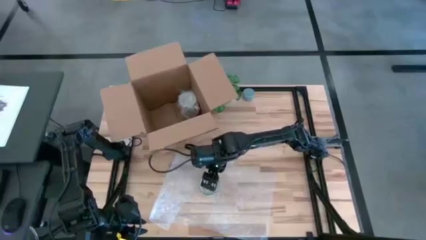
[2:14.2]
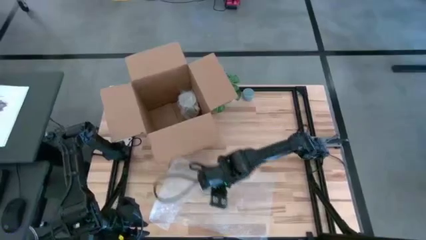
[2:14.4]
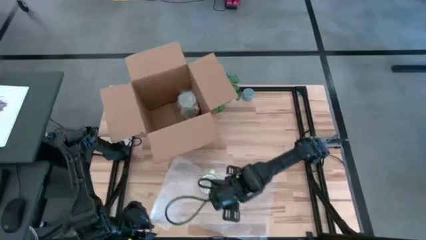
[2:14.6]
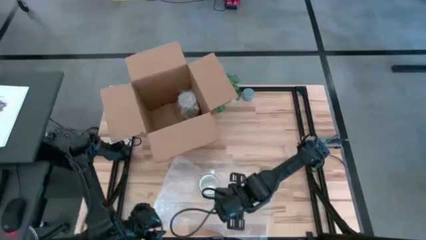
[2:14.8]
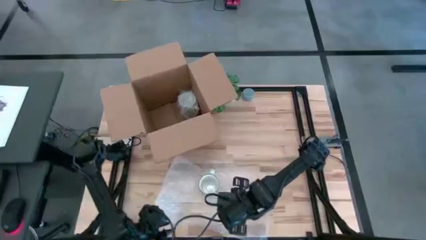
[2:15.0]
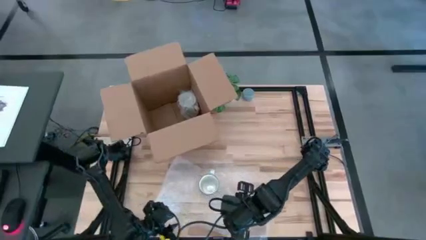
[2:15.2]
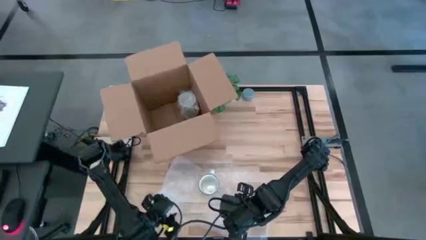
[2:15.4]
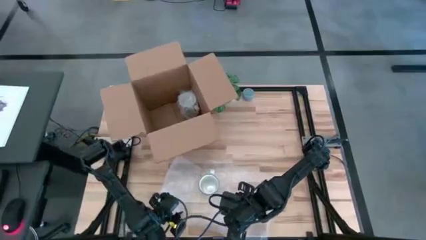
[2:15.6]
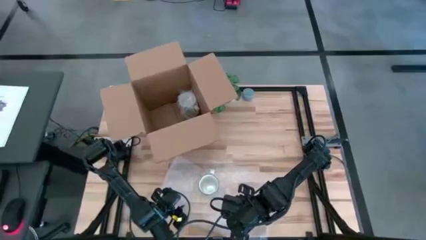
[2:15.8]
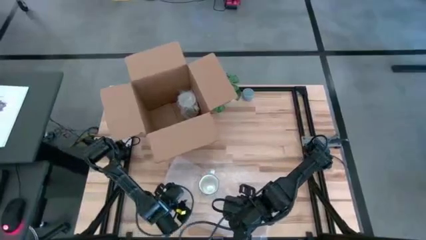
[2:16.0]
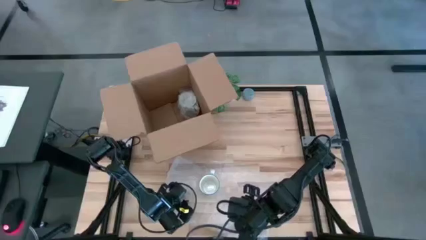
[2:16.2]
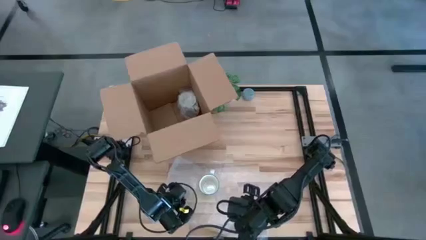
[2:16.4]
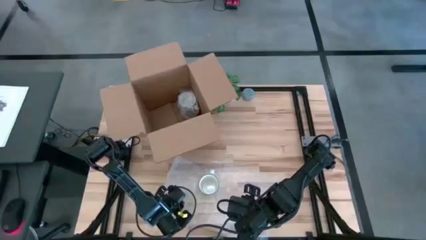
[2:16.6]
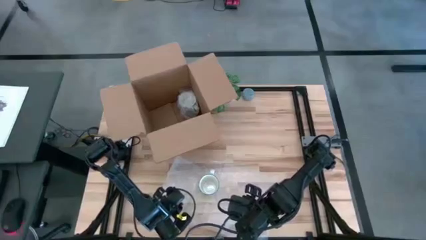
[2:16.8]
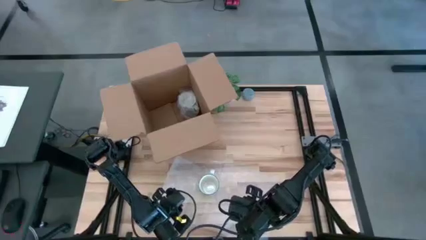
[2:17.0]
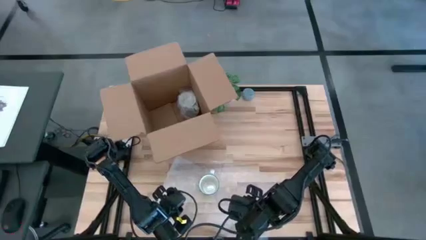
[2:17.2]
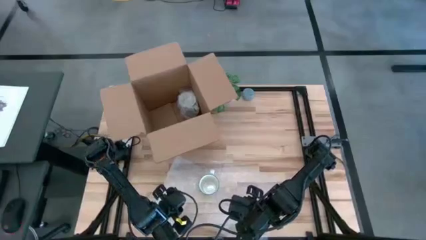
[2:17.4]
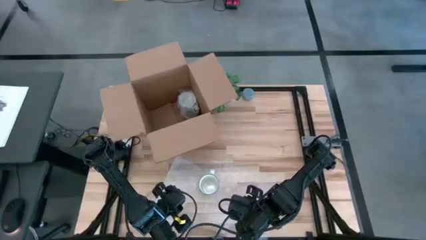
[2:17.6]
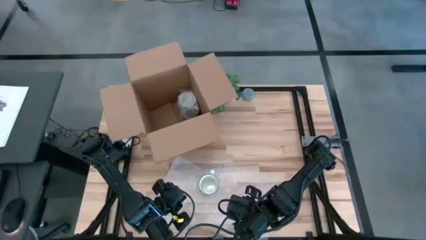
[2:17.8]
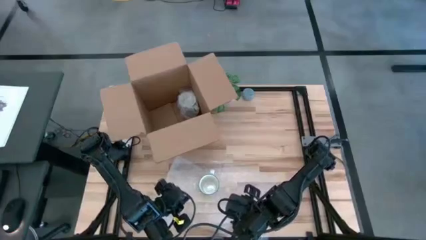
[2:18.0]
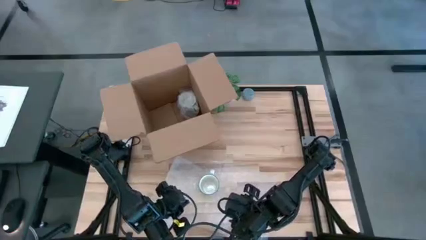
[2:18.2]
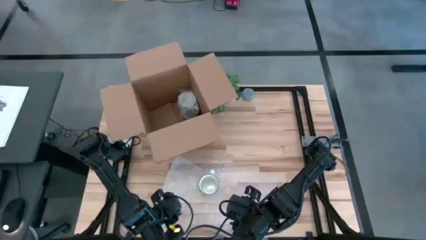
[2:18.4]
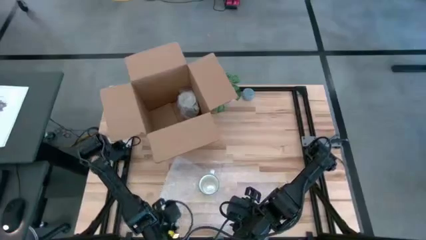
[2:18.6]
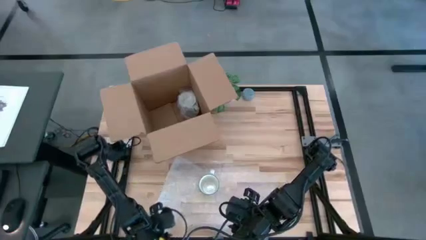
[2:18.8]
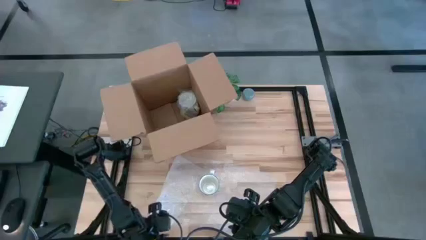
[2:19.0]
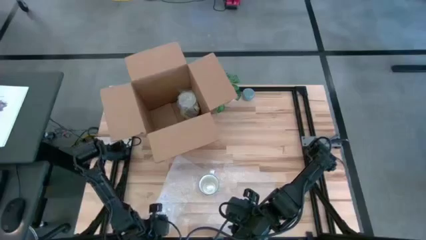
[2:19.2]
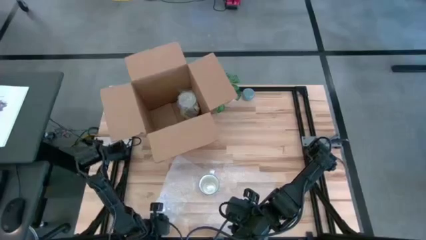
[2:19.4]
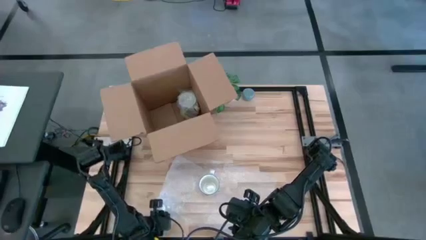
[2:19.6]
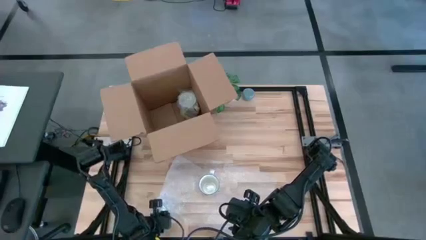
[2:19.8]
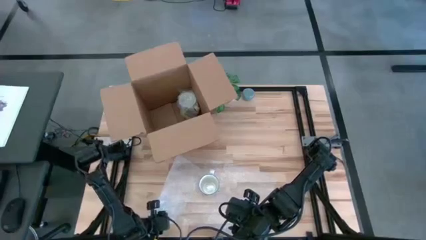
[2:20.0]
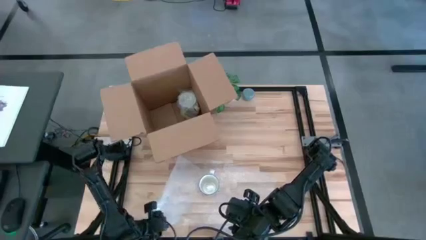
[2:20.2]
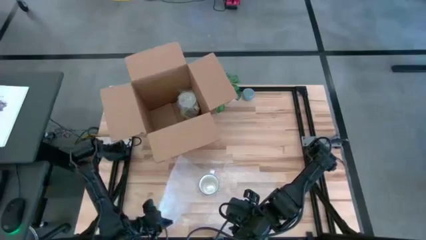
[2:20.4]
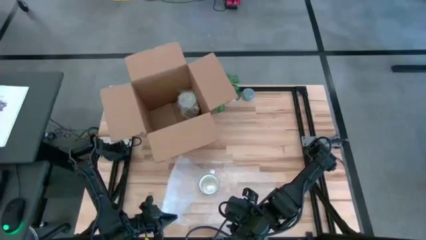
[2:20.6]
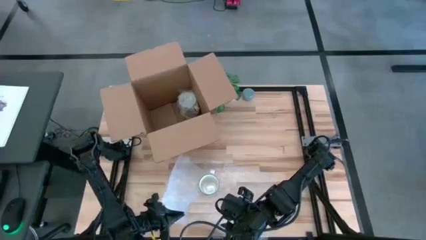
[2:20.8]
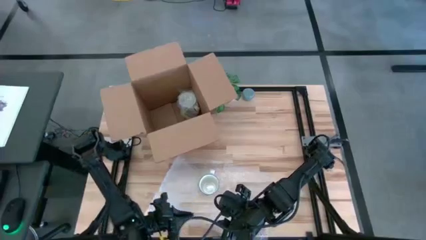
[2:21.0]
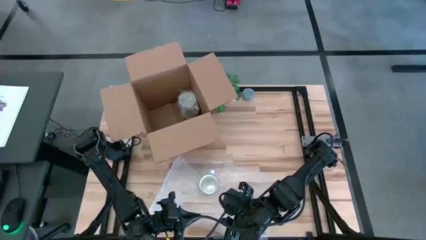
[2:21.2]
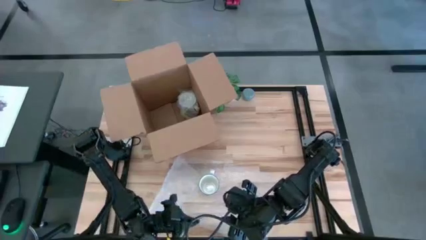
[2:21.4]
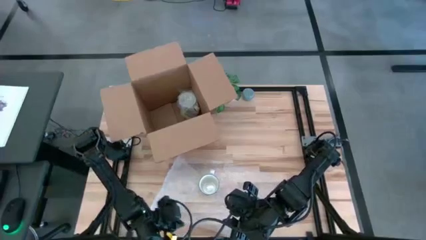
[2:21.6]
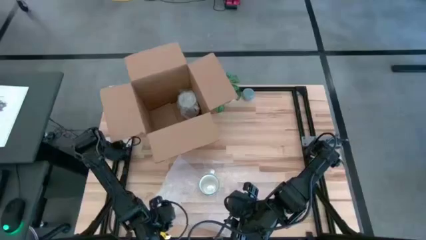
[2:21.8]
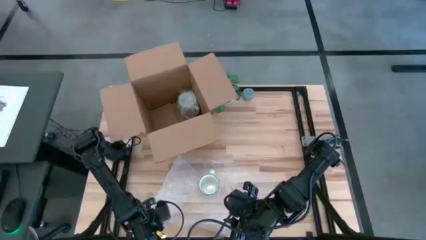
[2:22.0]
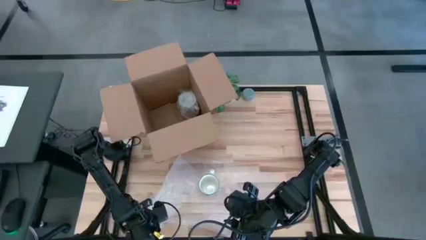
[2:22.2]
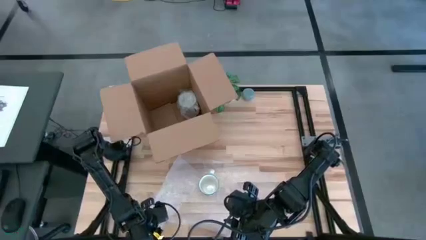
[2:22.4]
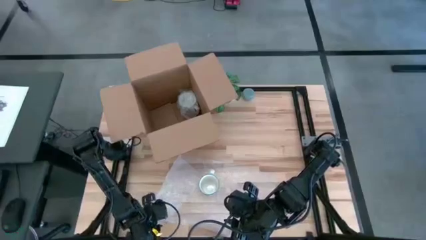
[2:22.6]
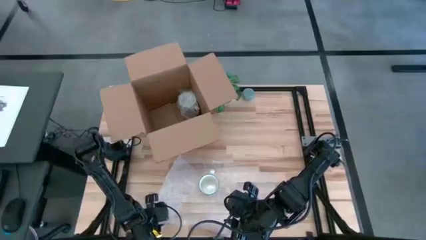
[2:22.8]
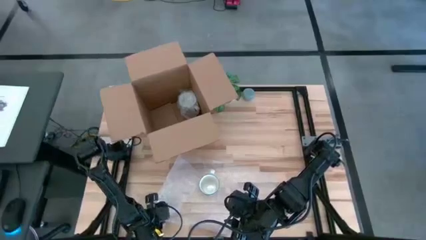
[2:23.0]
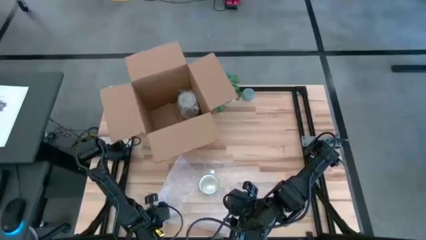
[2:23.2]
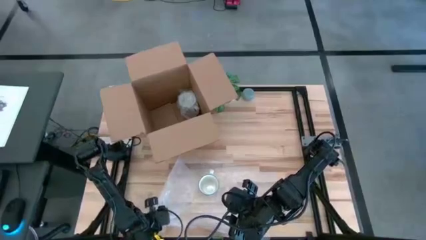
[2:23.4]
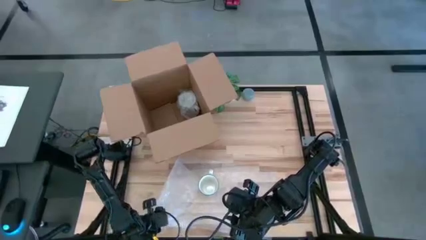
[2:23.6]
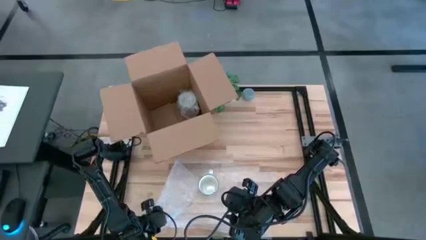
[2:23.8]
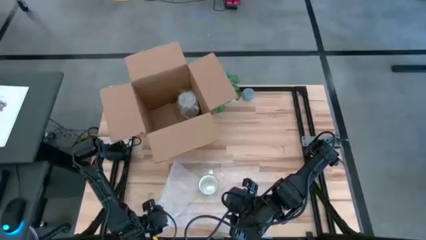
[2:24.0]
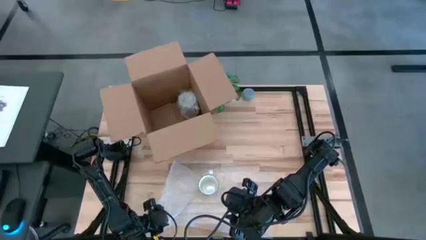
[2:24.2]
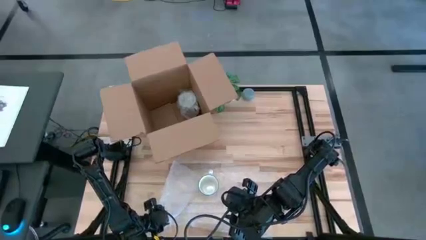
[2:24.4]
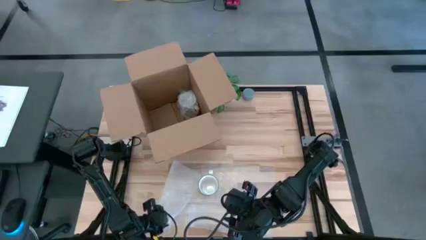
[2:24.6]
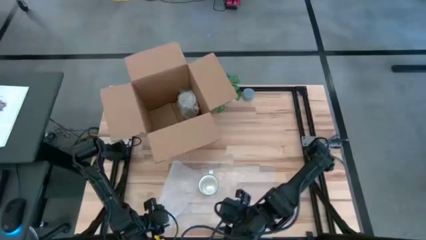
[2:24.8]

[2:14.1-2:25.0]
Task: wrap mug
Wrap the blue mug with the bubble wrap

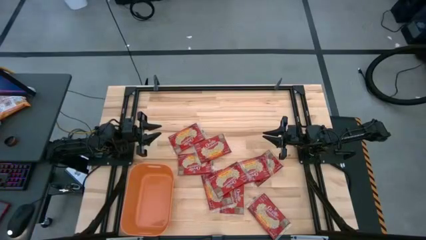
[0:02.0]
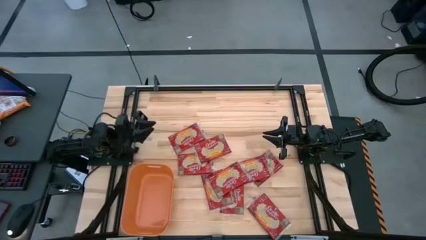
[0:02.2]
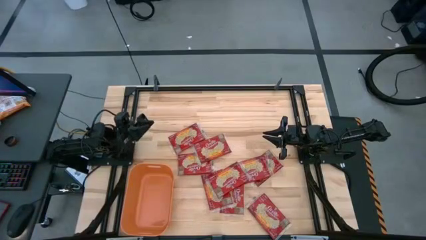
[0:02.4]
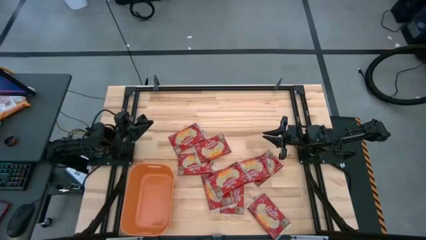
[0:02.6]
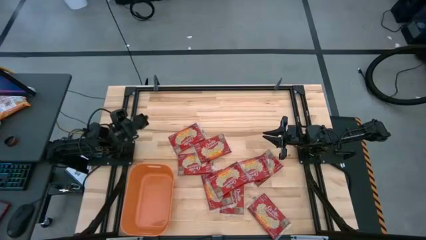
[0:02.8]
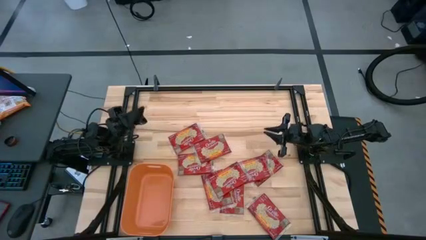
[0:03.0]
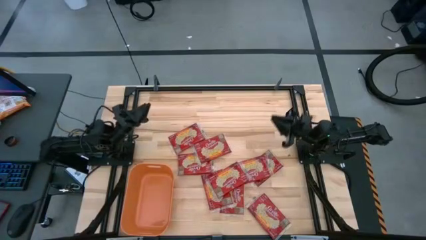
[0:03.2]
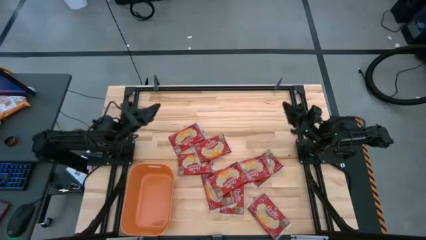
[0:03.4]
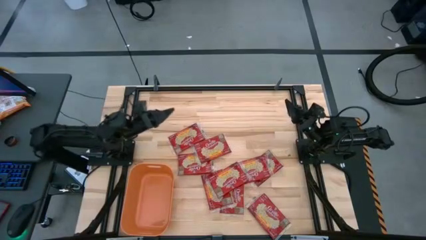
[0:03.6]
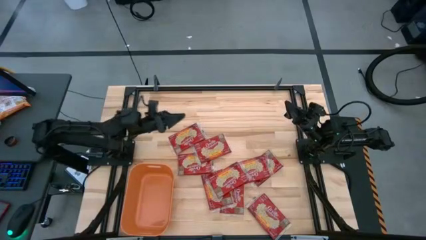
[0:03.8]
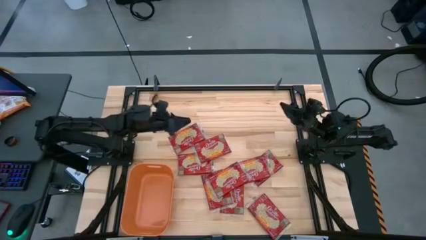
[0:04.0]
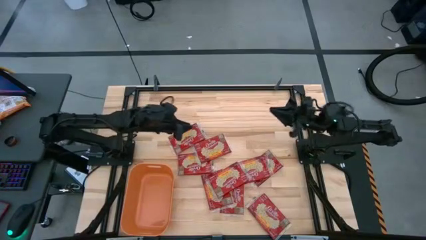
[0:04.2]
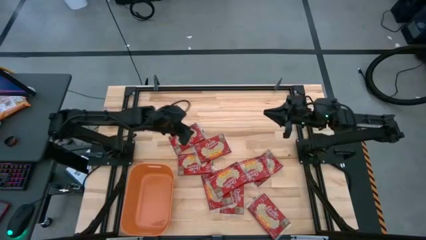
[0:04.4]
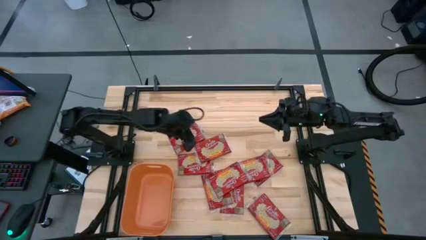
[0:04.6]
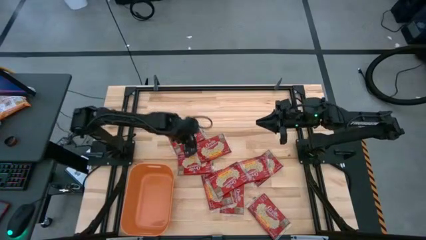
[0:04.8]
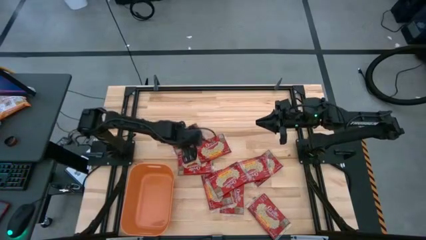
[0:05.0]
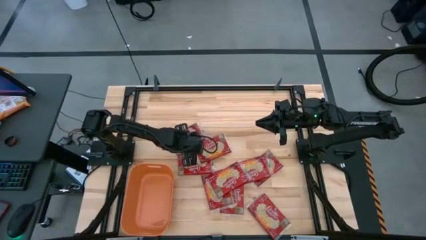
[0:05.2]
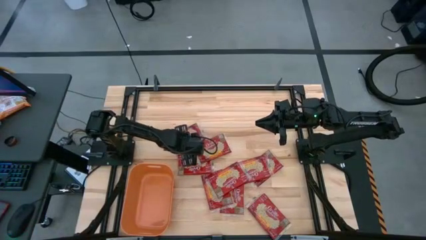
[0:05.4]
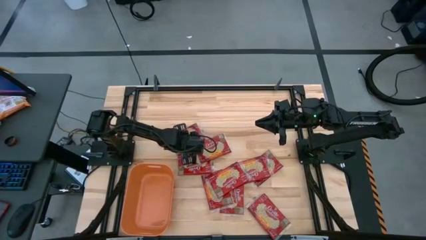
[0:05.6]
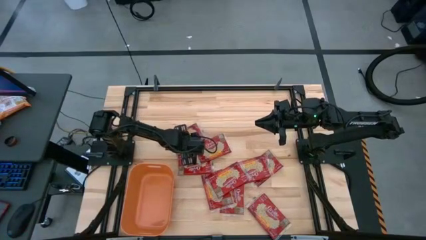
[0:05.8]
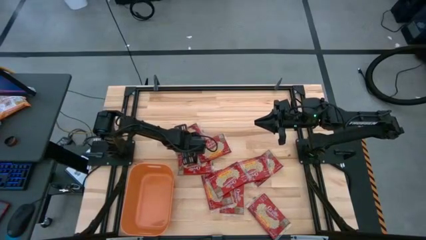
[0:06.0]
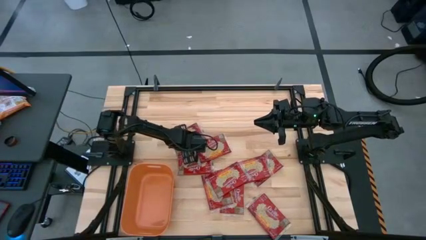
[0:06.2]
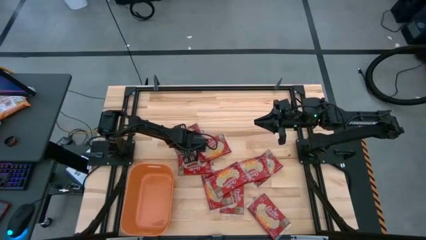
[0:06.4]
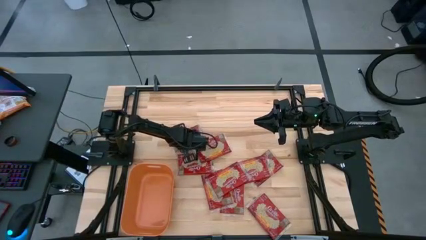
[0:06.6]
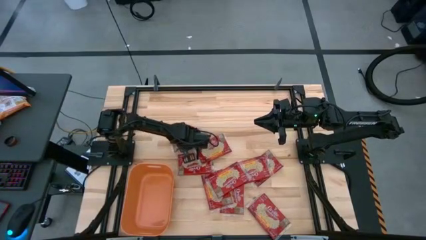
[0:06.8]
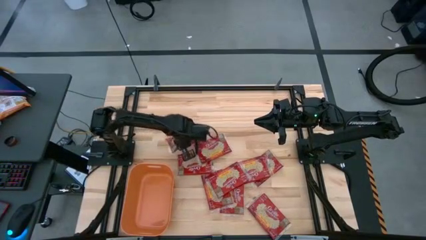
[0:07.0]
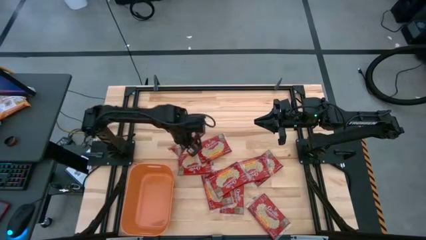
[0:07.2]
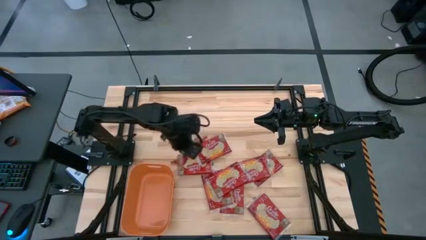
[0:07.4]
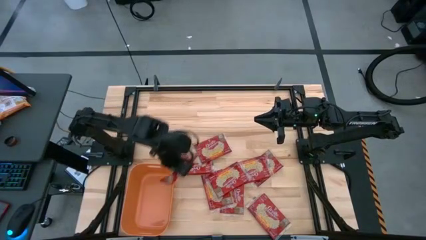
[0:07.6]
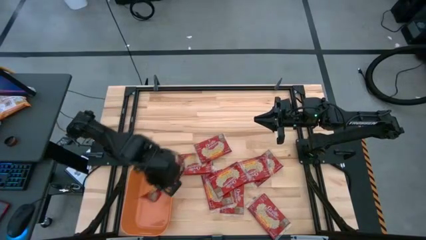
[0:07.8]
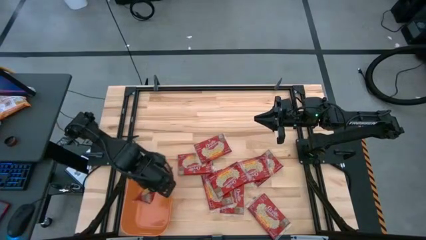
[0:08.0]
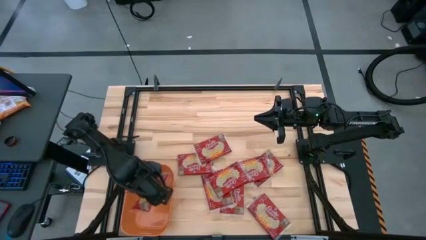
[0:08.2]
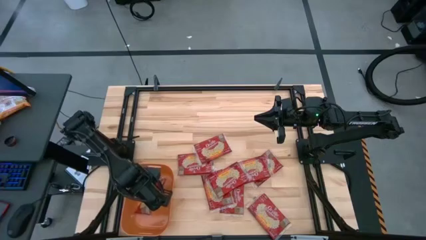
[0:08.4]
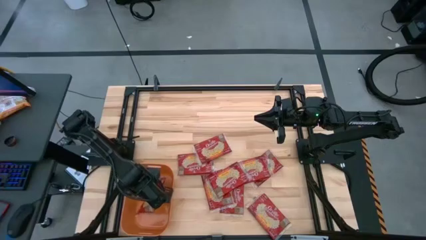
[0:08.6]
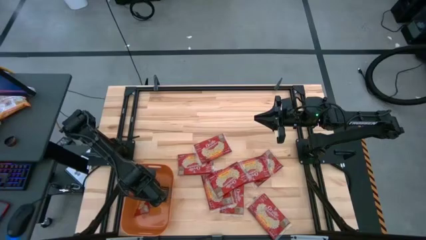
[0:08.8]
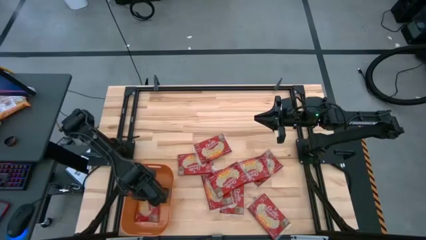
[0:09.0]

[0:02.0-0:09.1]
Task: Sort popcorn bags into baskets
Put the red popcorn bag into the orange container
